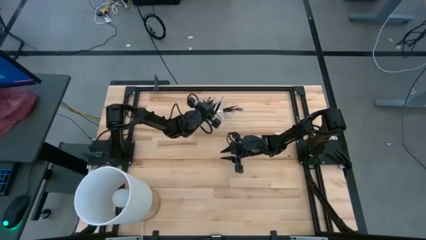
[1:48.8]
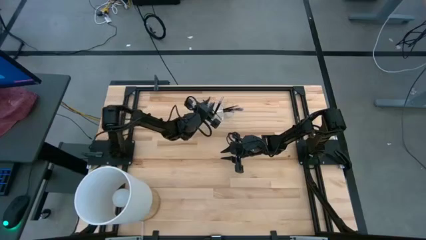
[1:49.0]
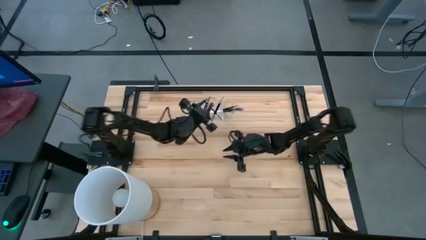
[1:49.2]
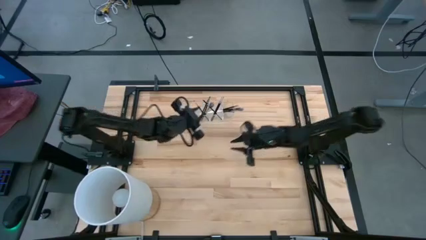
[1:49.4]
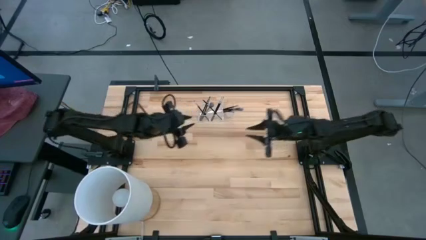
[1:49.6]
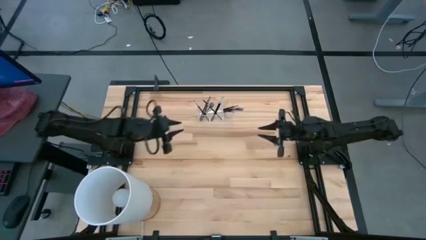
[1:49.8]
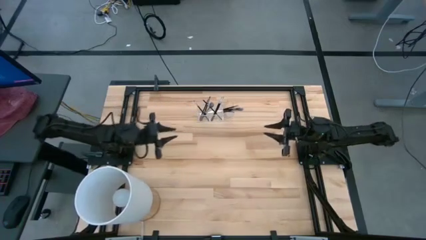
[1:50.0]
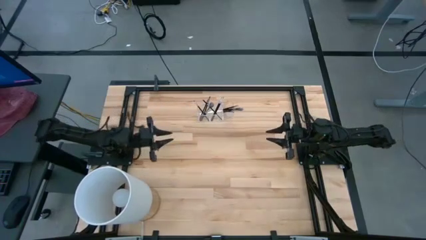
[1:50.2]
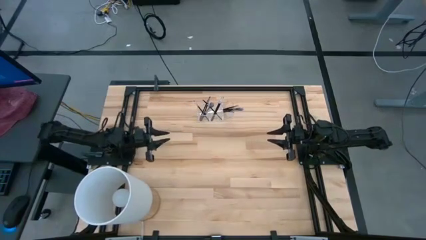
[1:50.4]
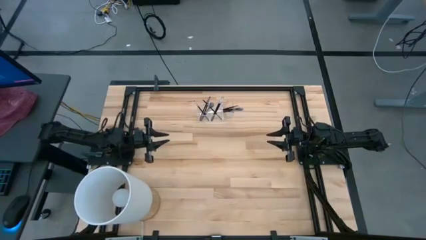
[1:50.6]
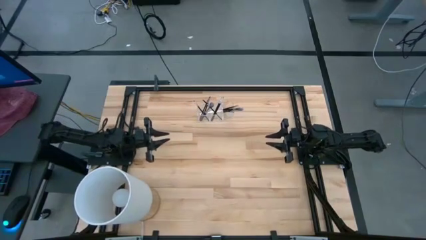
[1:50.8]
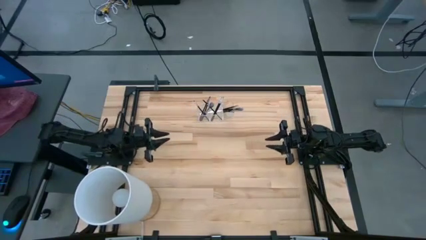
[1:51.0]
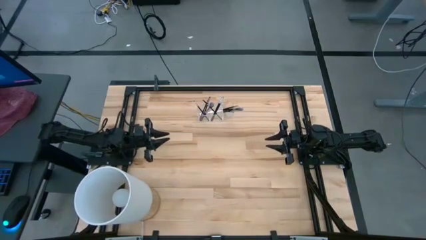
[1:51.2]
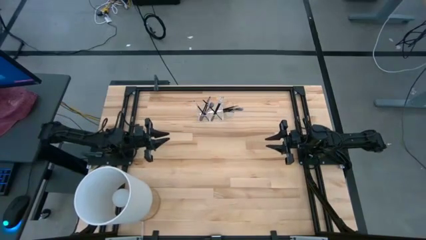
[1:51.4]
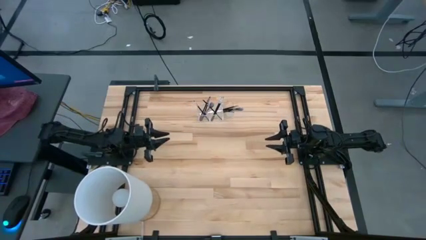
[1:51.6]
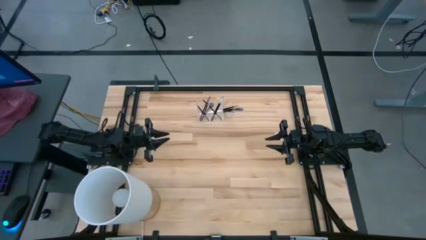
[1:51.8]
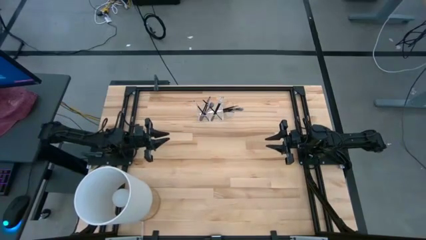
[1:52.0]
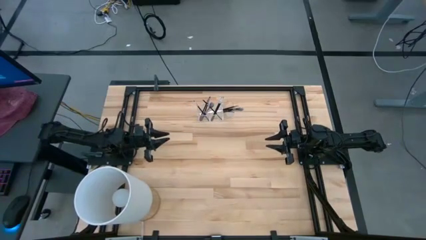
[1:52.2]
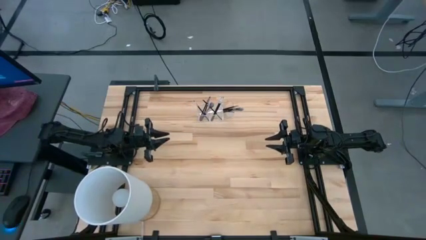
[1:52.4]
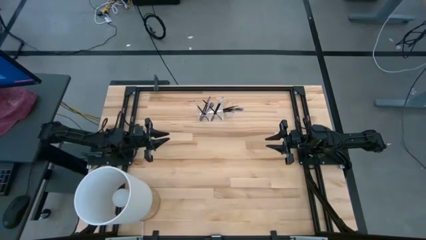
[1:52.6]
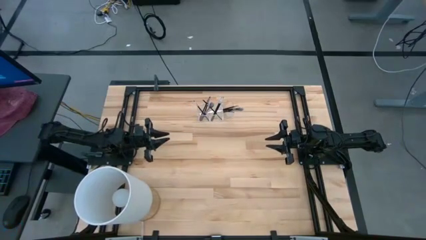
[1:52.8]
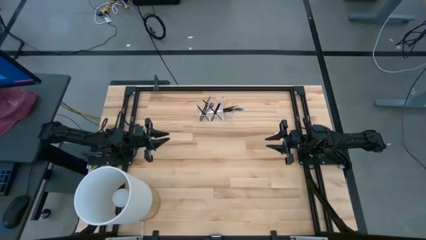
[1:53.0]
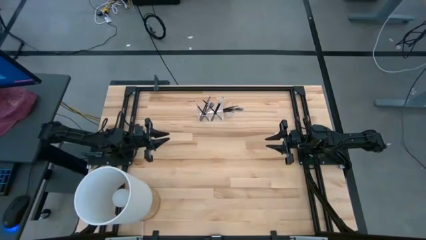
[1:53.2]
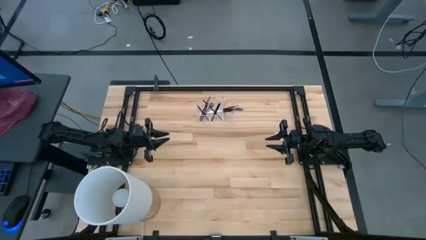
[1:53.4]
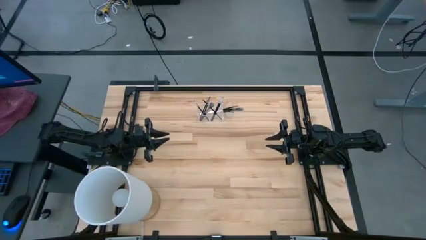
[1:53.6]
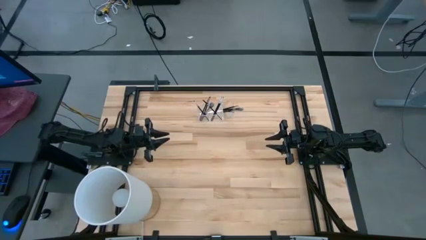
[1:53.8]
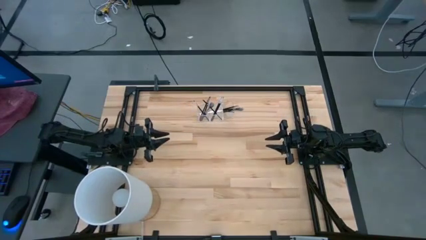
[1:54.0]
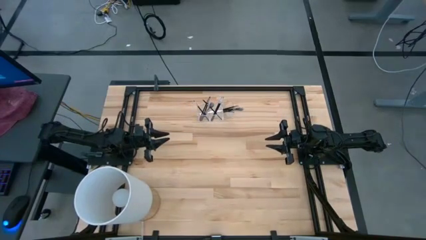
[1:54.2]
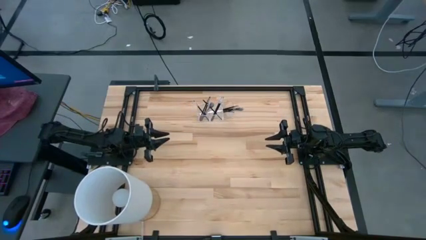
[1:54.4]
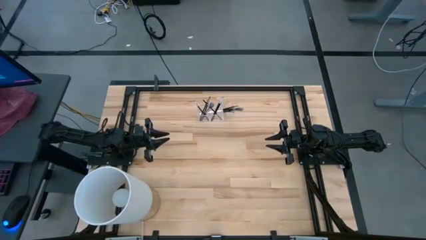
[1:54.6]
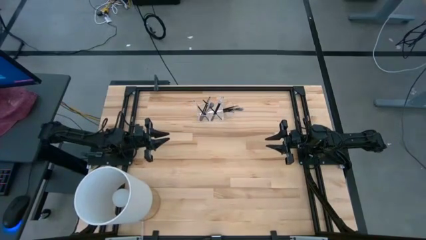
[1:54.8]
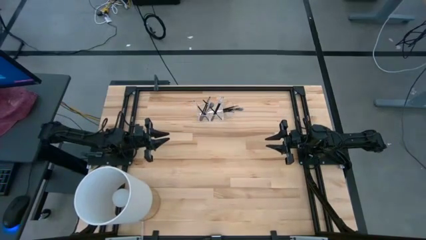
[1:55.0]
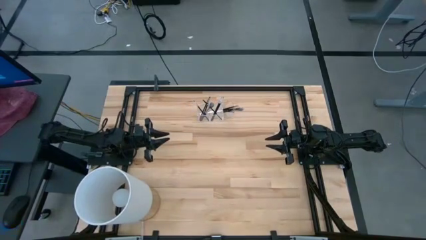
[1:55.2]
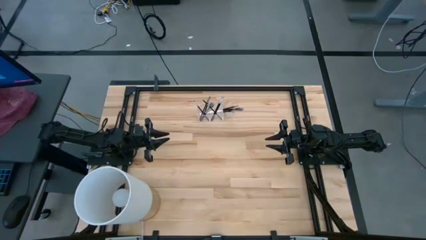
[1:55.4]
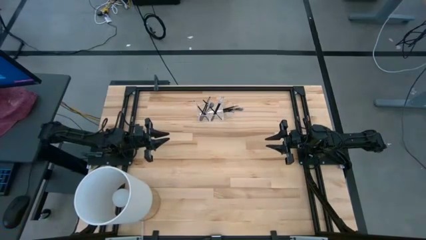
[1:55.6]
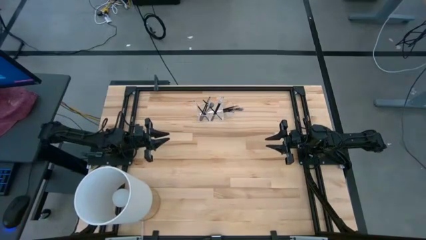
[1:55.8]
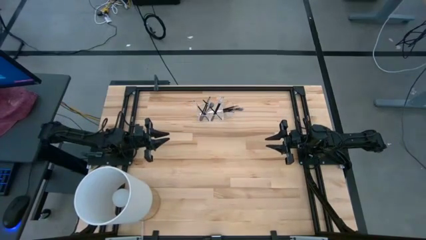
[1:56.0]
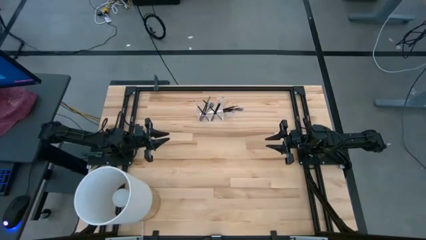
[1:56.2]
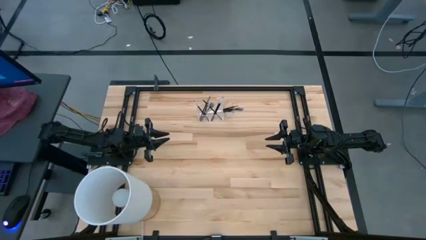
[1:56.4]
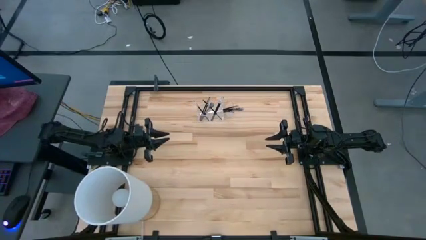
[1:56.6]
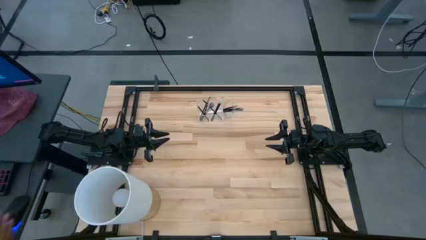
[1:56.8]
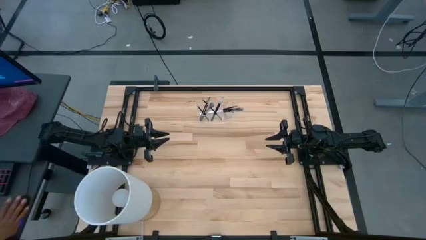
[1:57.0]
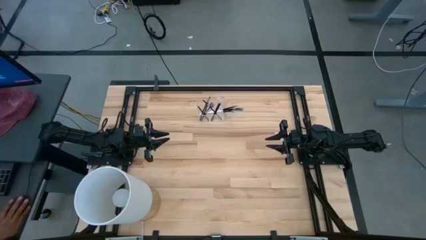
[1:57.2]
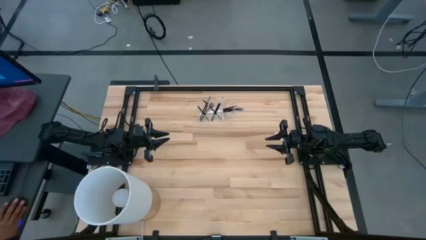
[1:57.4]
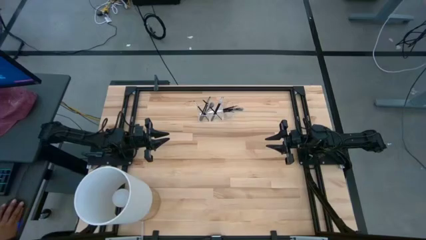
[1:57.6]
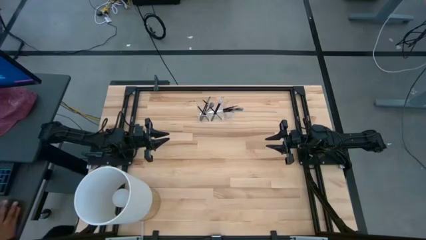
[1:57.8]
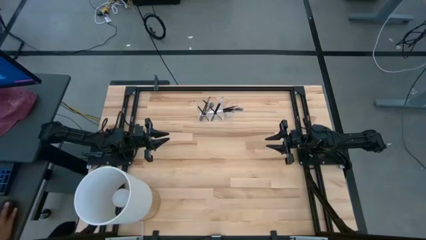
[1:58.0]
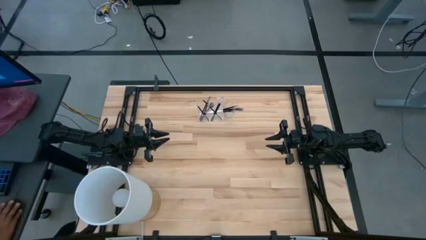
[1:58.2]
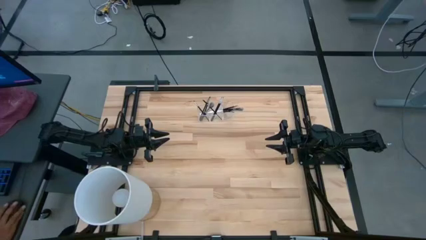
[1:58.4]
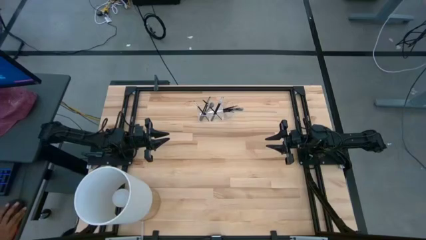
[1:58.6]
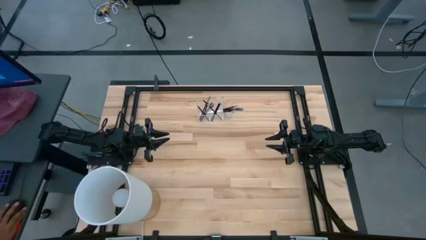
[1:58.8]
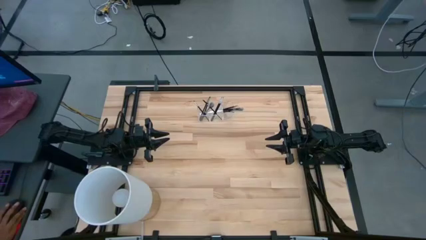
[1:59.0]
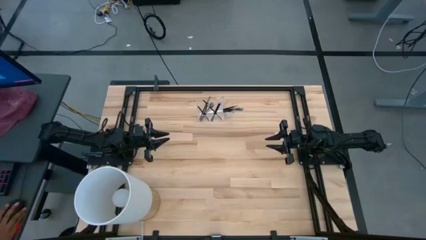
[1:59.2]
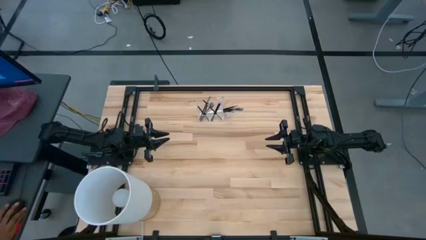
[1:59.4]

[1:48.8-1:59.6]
Task: Put items in baskets/containers
Return to Home Position

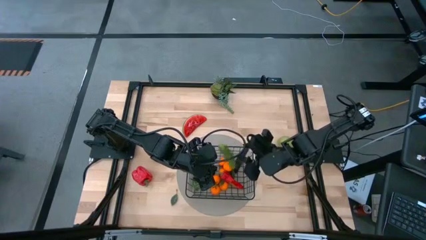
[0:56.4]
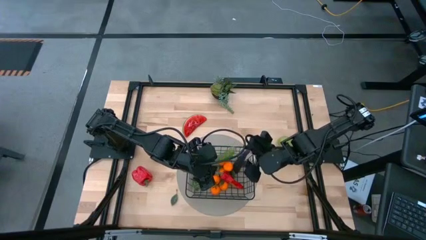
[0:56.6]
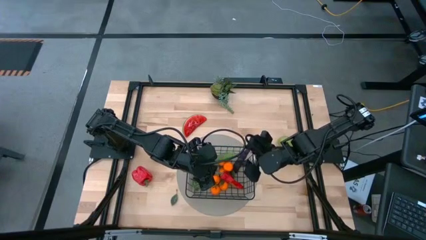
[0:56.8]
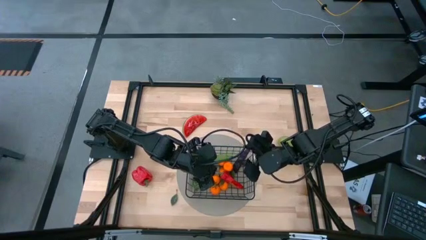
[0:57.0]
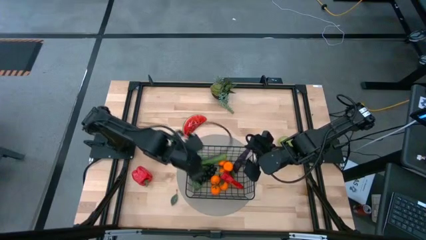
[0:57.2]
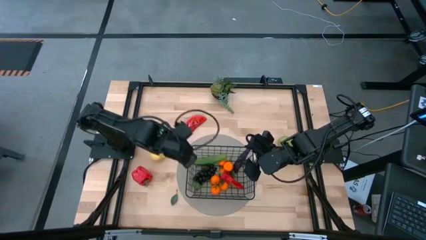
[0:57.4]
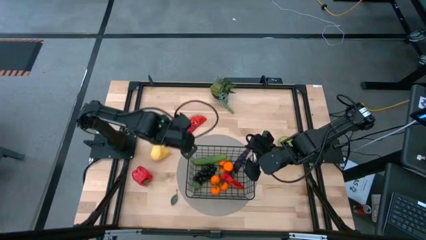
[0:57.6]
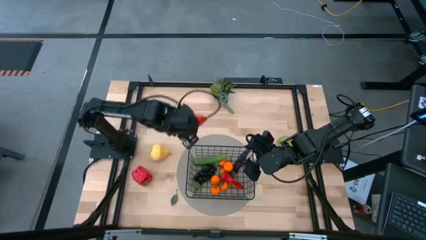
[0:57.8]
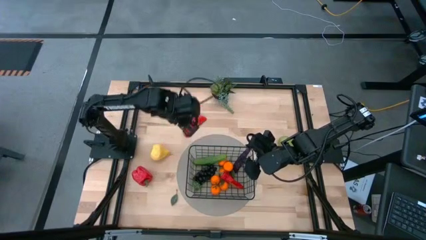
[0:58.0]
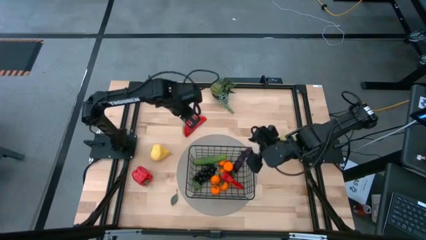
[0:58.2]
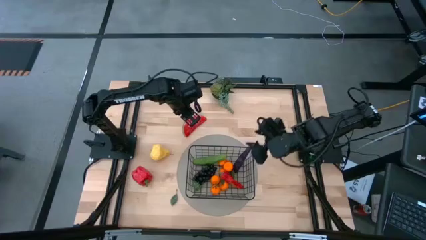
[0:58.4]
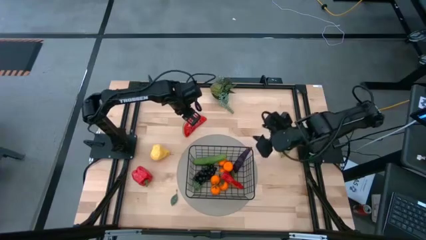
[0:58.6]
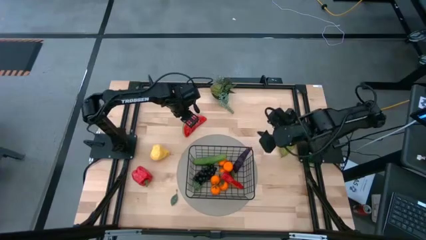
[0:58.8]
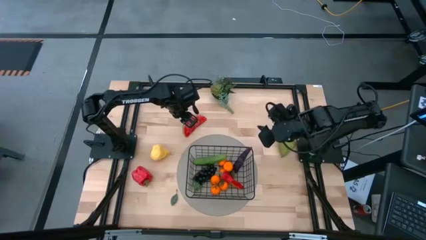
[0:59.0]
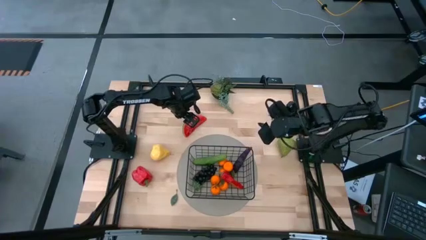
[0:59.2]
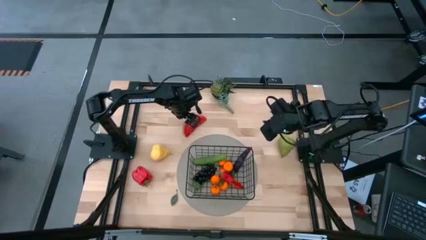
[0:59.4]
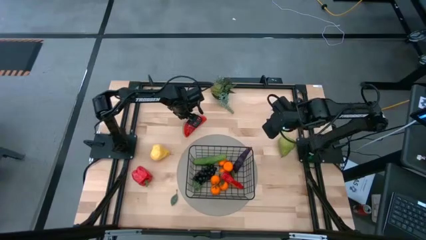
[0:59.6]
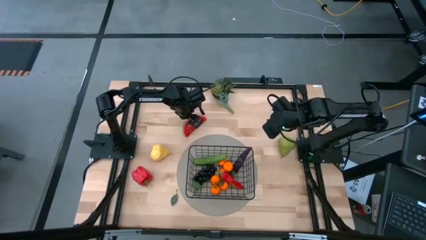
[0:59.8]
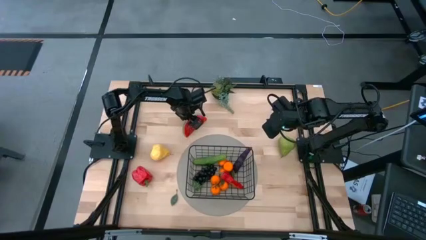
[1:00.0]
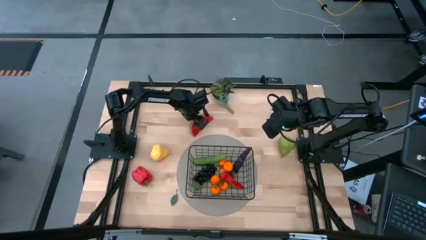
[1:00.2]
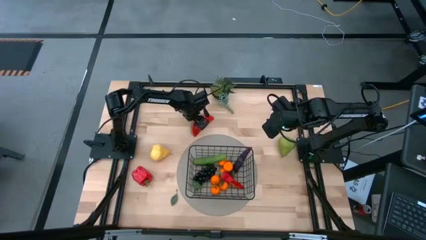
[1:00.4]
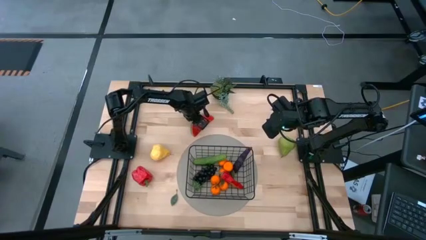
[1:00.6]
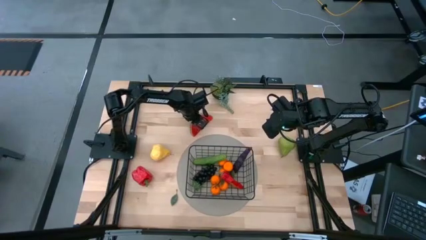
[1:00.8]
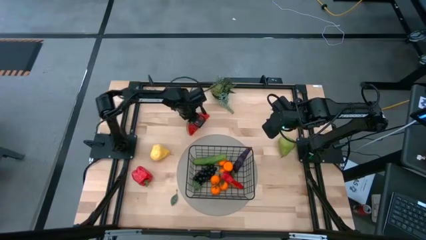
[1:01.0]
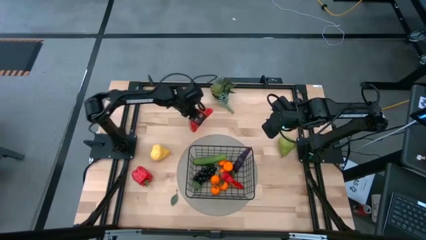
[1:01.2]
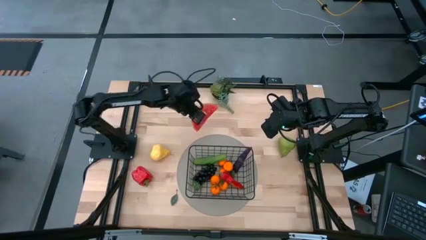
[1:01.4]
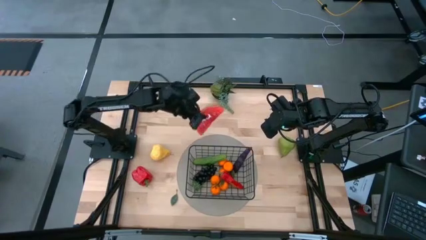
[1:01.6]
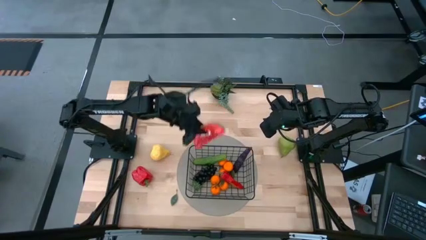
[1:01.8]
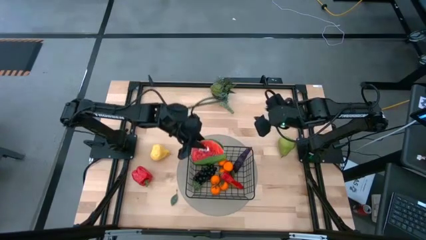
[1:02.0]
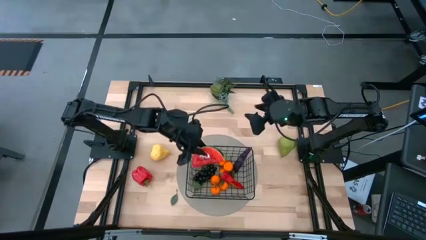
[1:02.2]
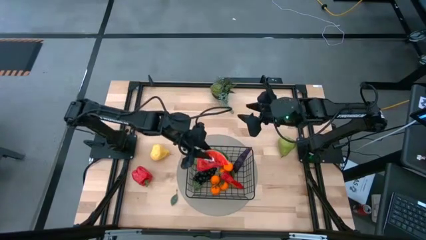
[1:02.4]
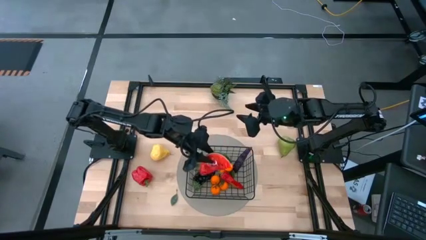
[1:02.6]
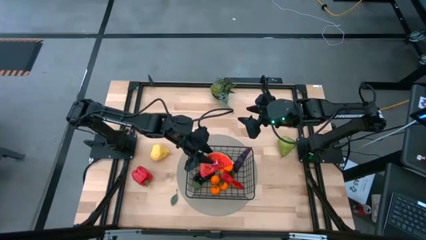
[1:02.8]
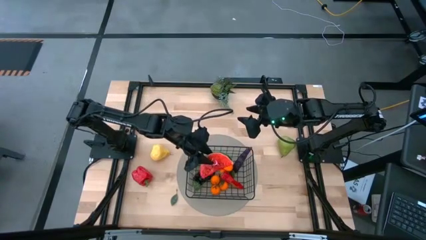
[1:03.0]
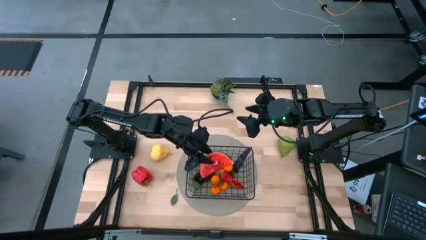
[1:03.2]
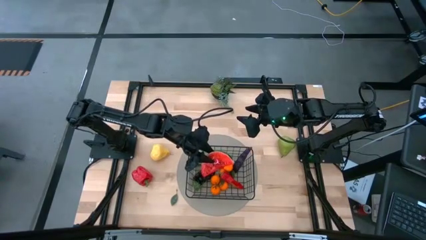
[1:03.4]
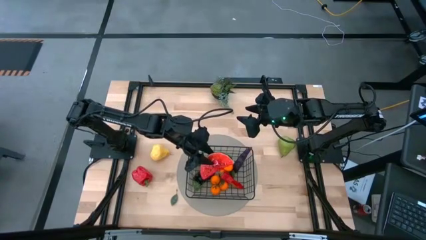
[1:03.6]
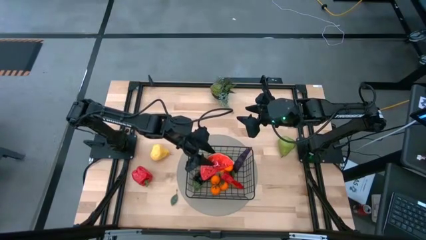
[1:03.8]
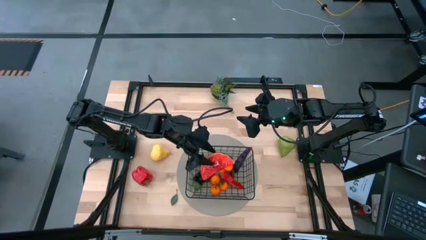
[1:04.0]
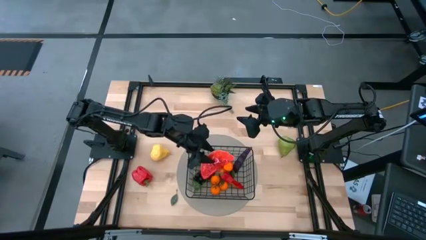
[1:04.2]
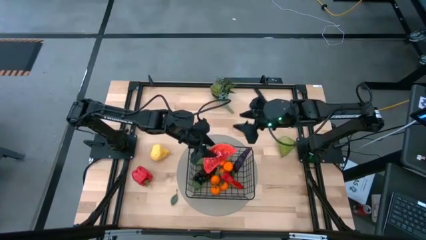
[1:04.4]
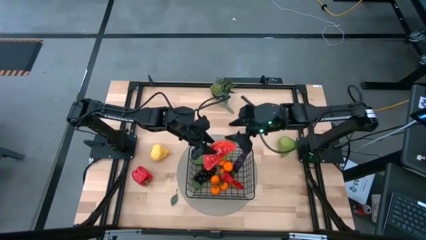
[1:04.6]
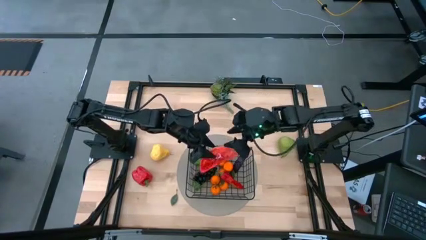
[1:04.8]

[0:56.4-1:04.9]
Task: Build produce basket
Put the red watermelon into the black wire basket
